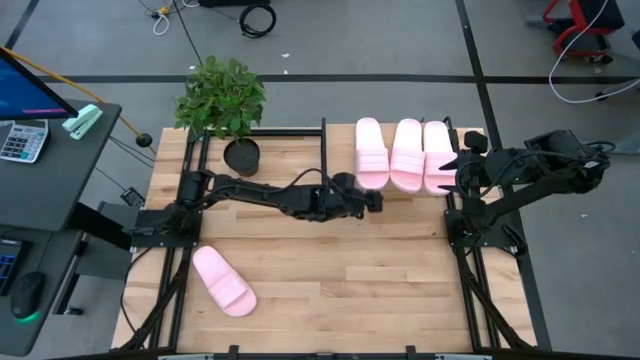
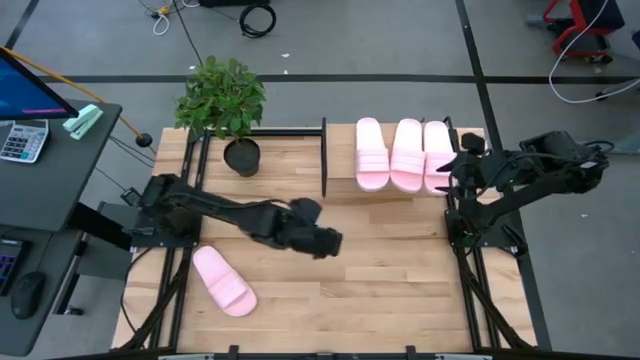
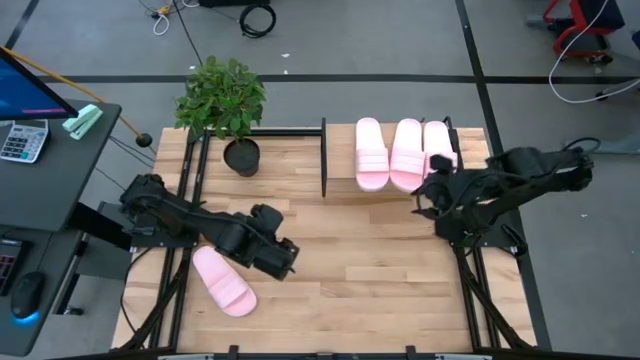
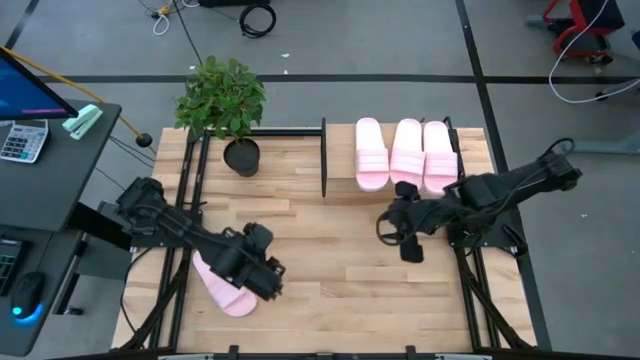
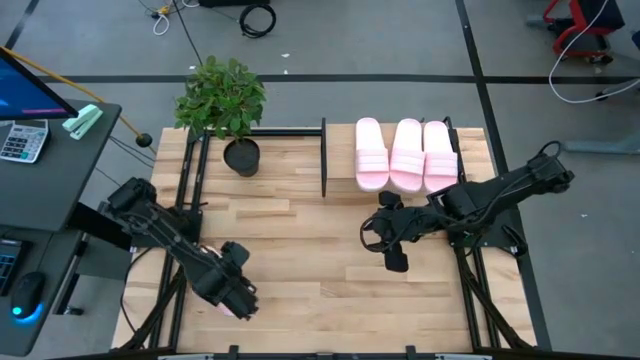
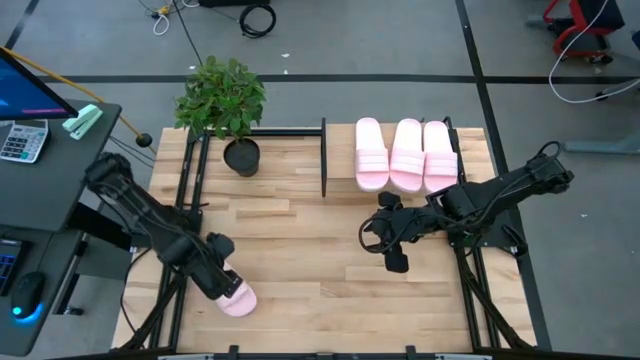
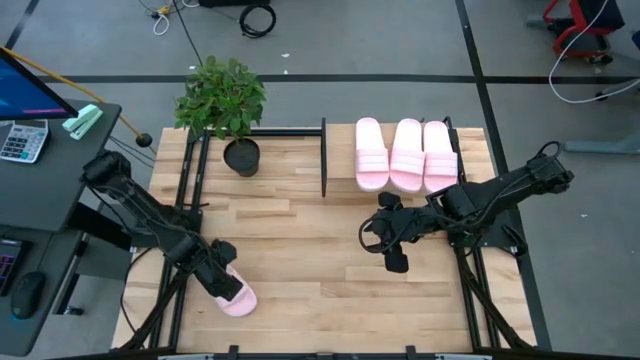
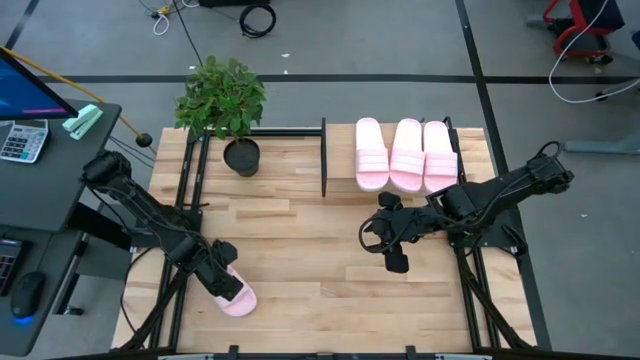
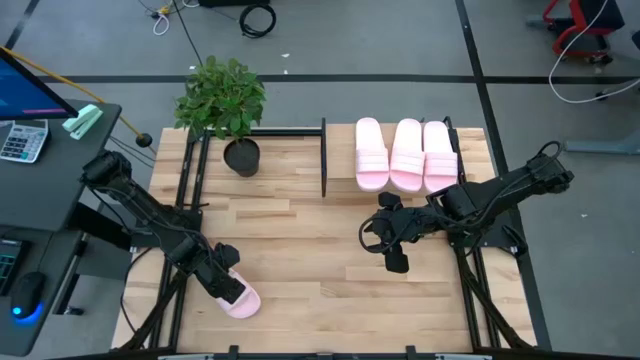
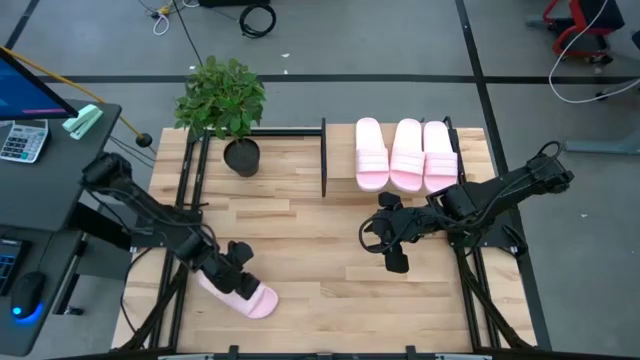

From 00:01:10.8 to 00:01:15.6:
Task: Pick and place slides into the shelf
Put the pink slide on the shelf

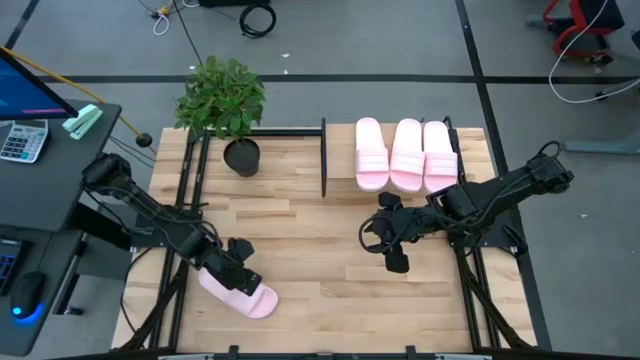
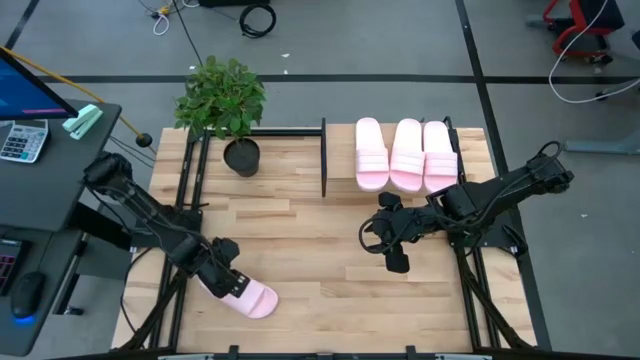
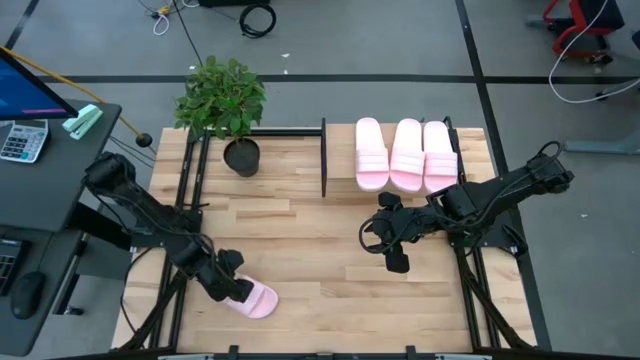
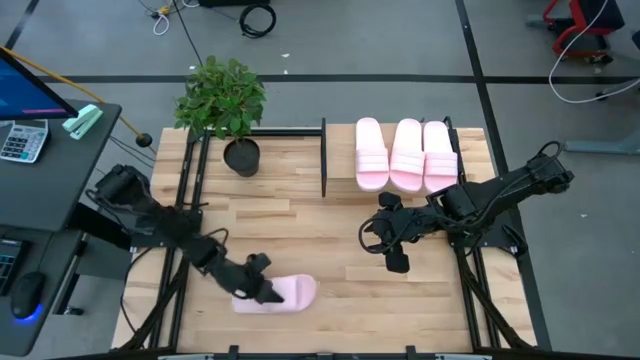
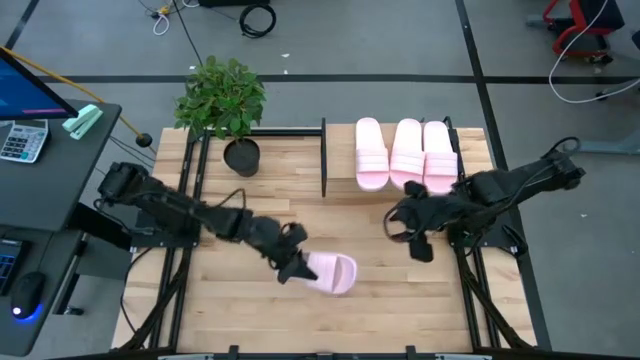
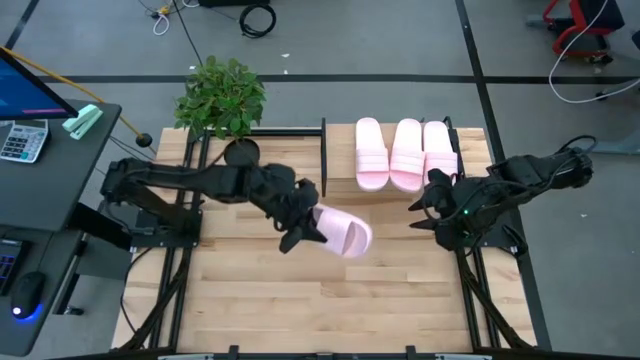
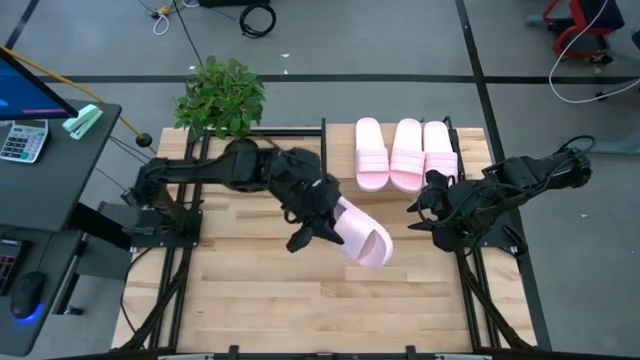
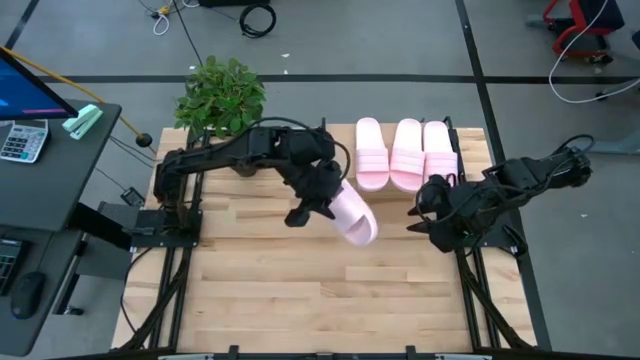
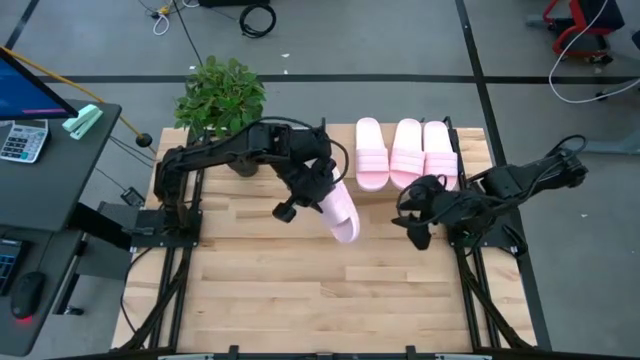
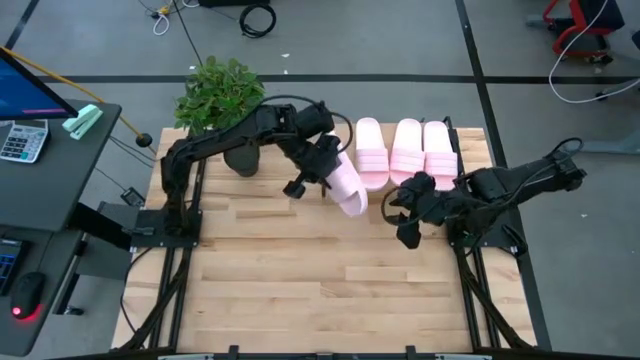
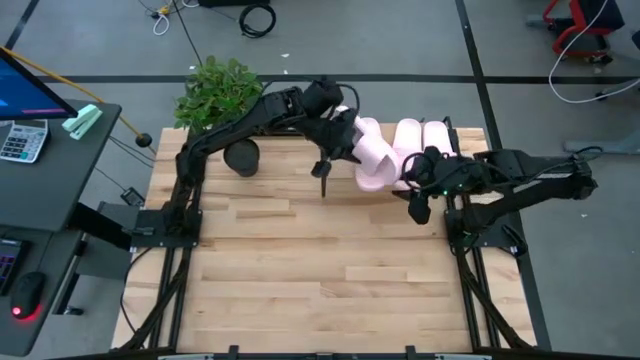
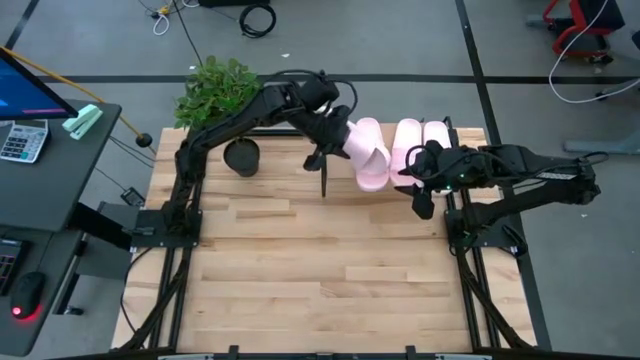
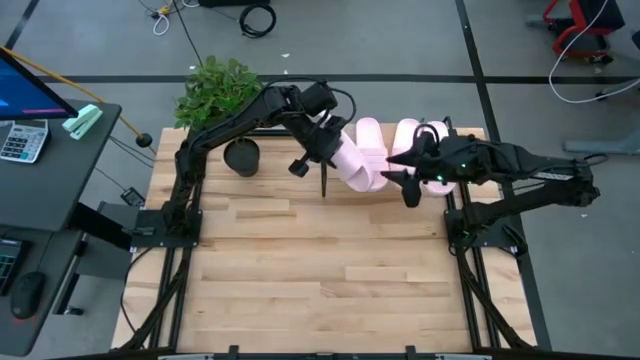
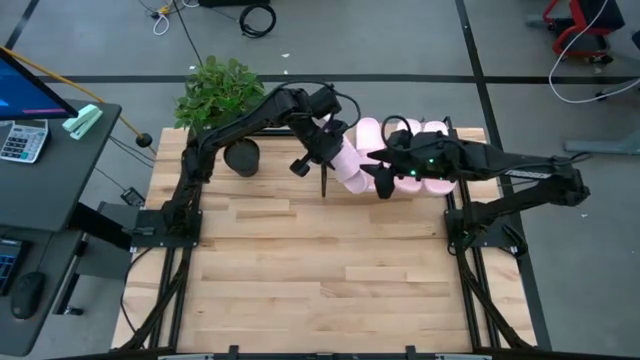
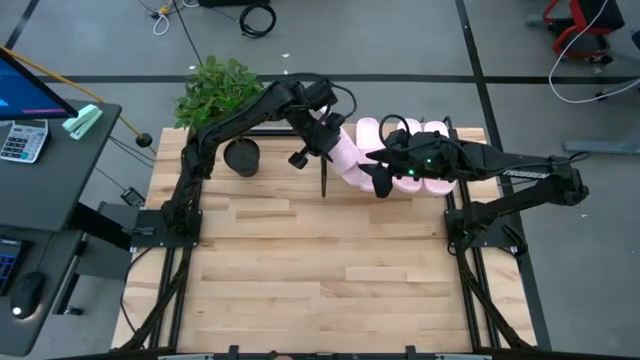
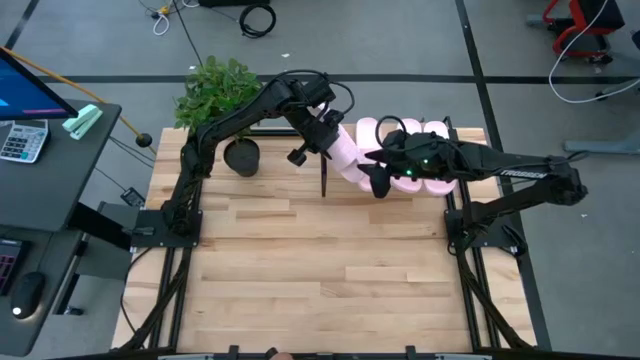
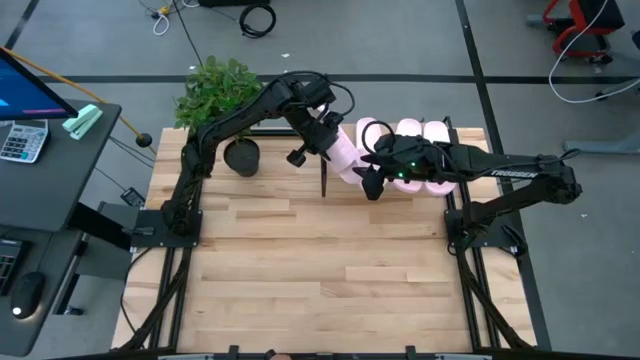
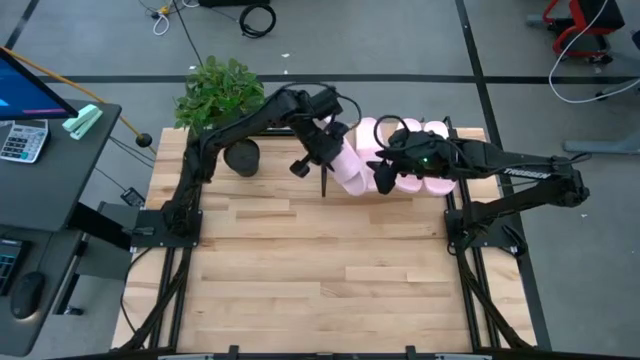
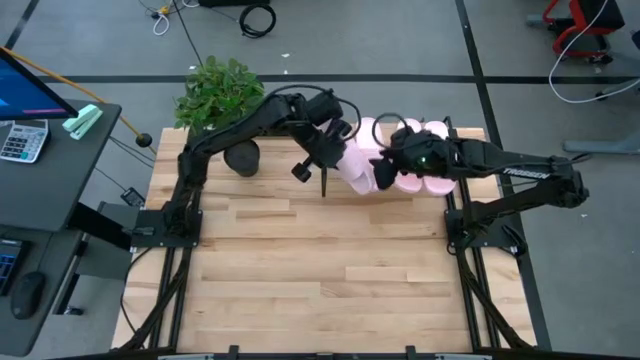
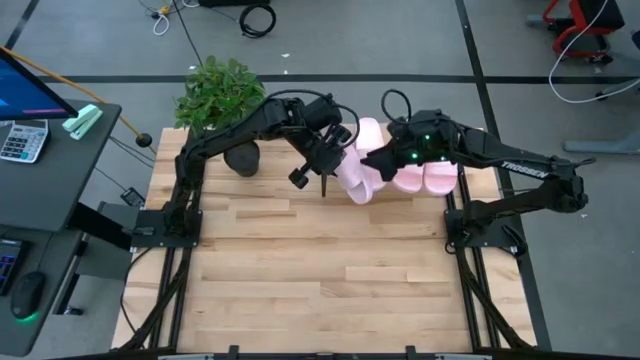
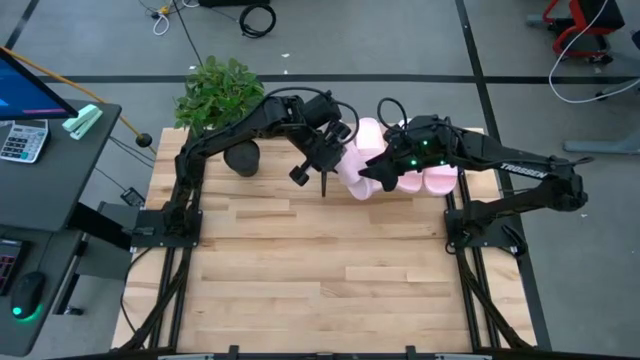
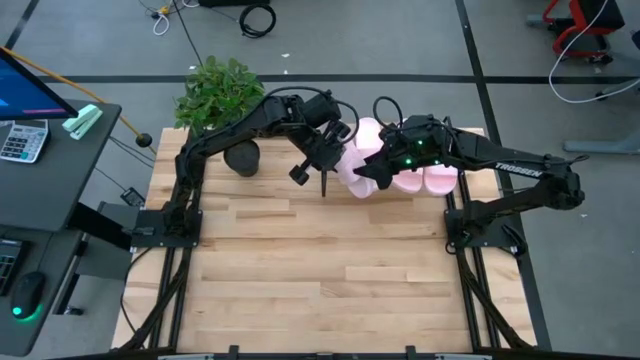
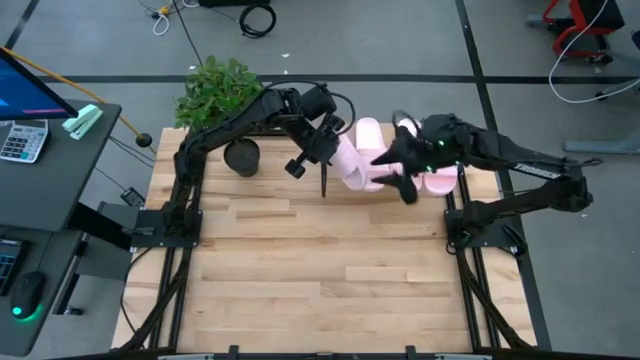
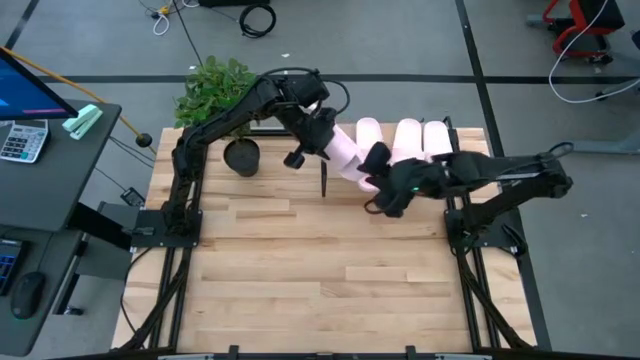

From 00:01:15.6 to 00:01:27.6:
Put the pink slide on the shelf

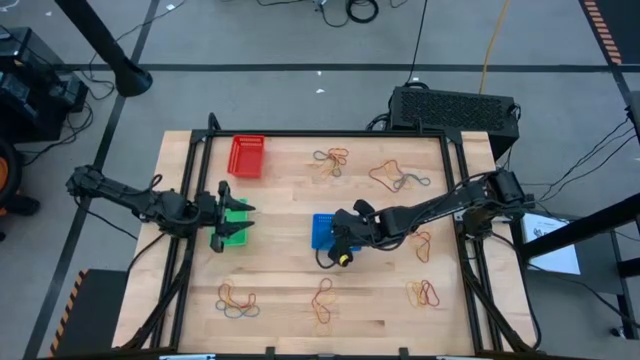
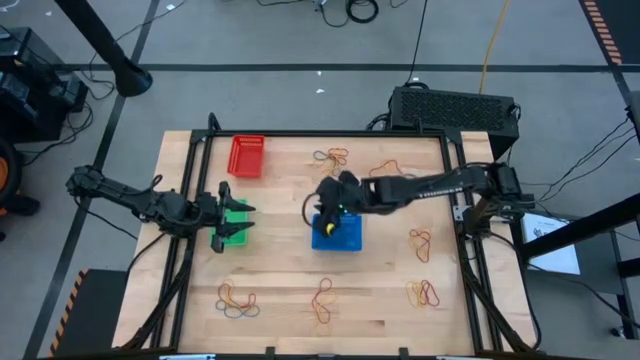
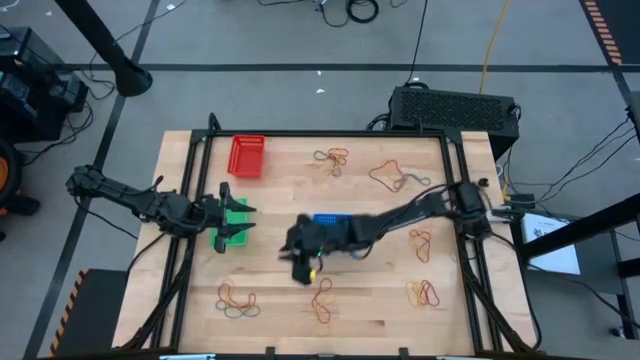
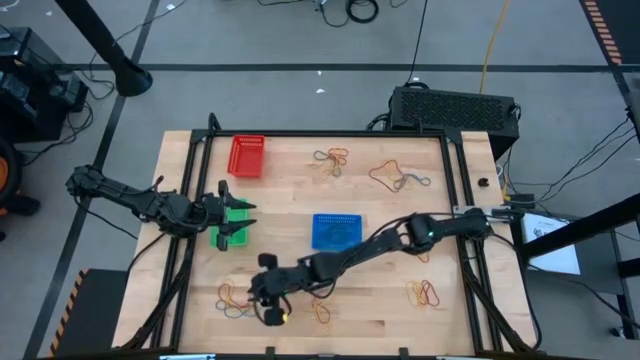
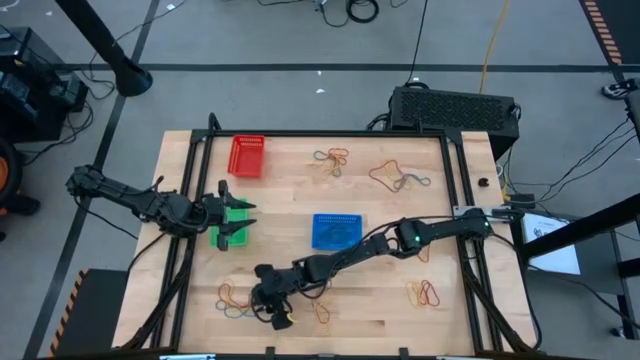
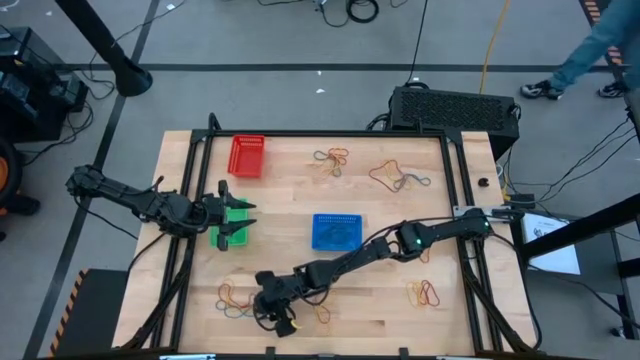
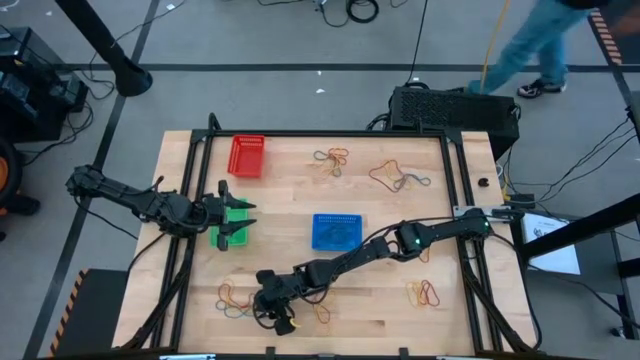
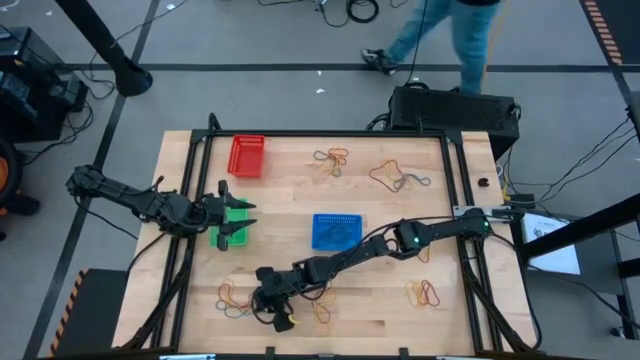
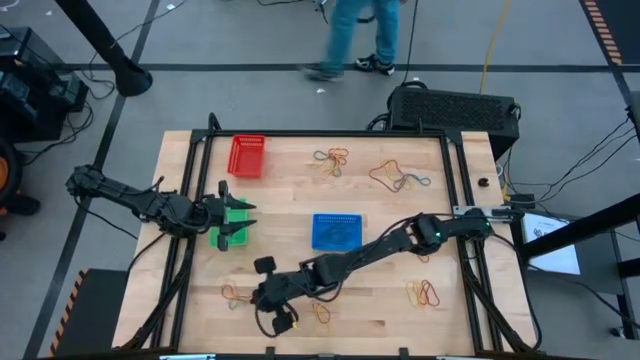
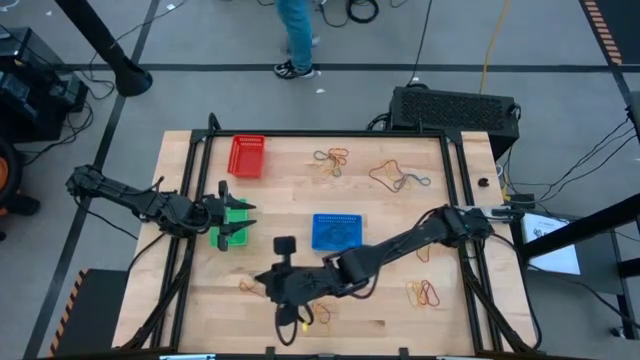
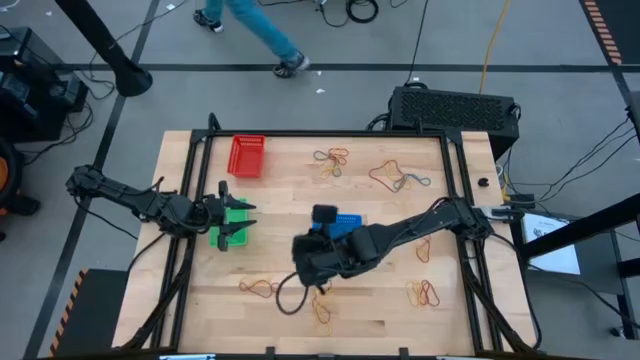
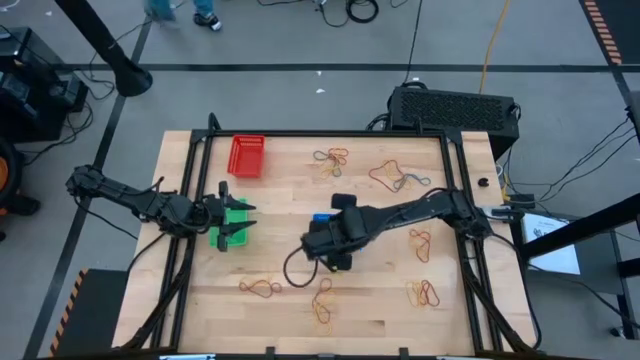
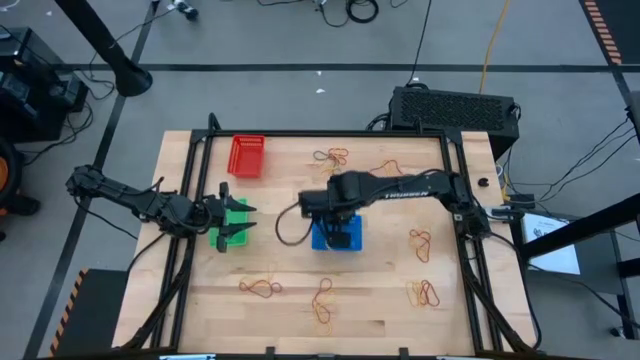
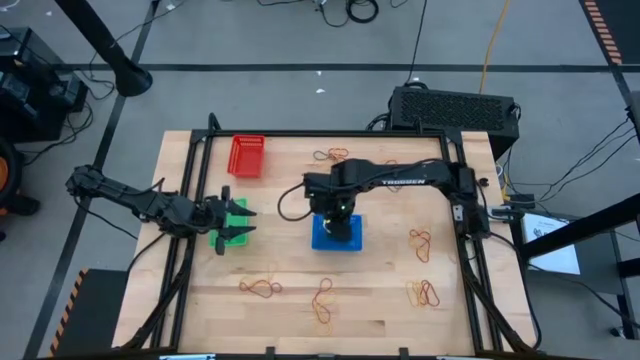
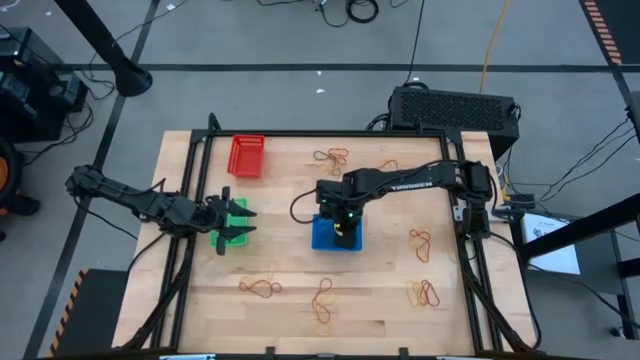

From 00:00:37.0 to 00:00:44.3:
Task: Sort rubber bands into baskets
Put the blue rubber band into the blue bin
